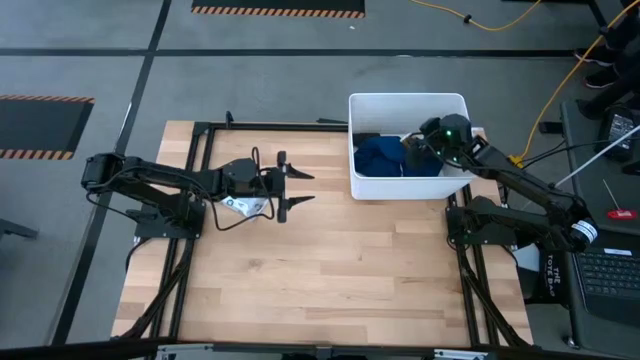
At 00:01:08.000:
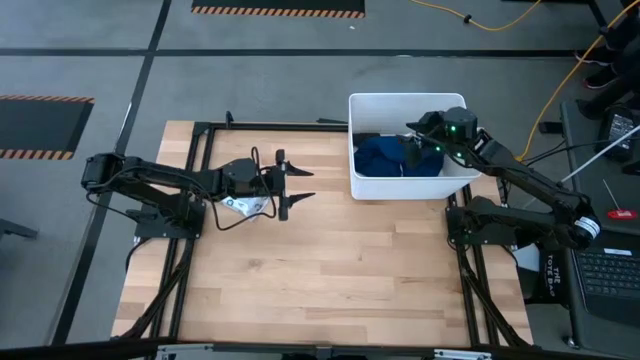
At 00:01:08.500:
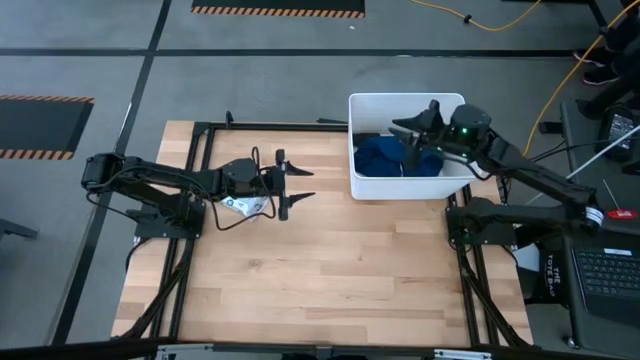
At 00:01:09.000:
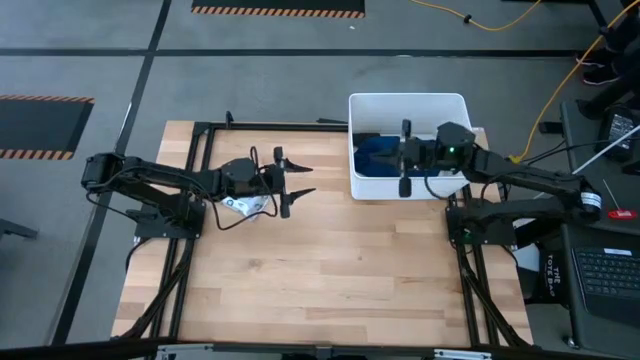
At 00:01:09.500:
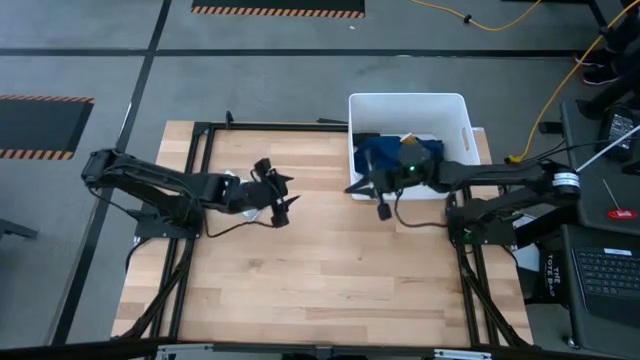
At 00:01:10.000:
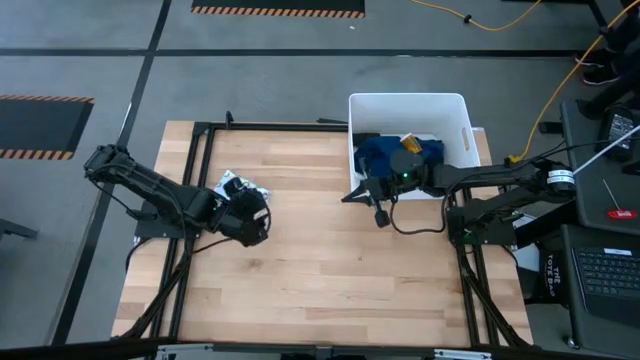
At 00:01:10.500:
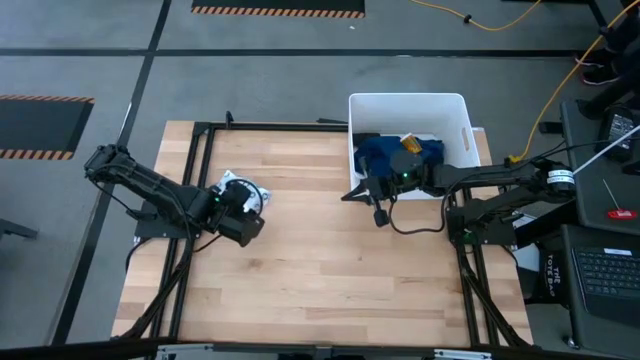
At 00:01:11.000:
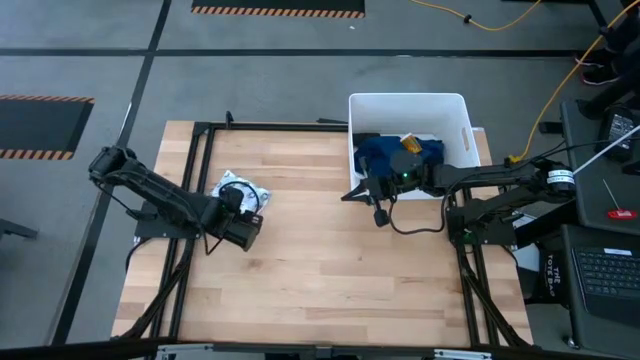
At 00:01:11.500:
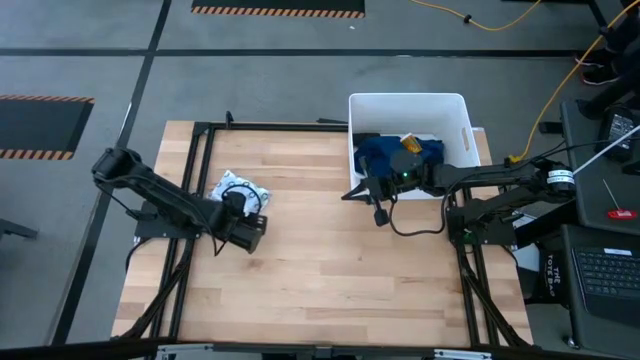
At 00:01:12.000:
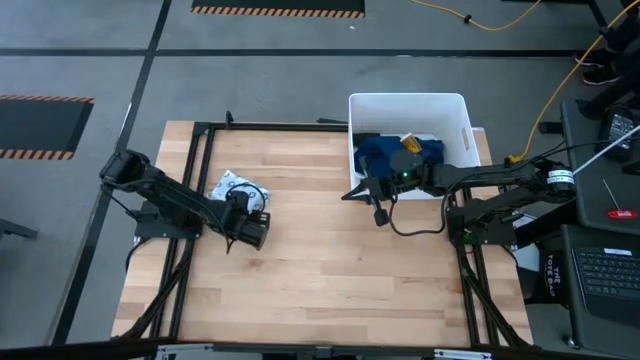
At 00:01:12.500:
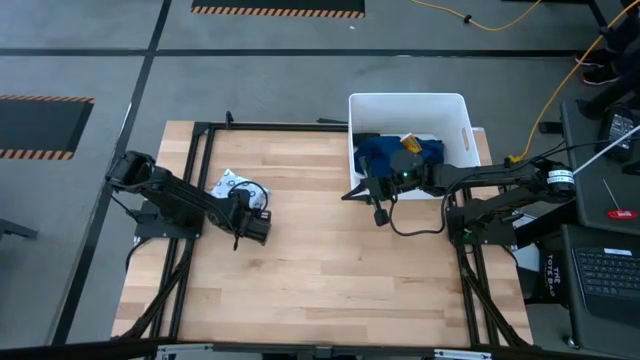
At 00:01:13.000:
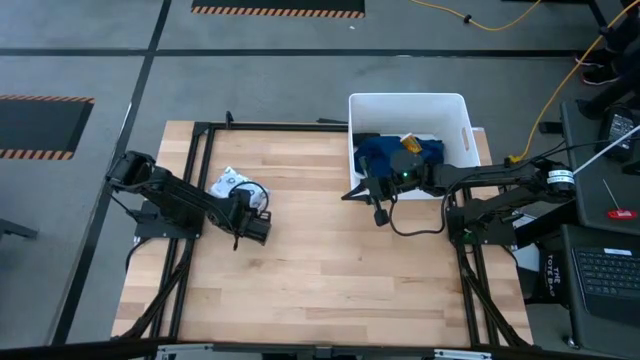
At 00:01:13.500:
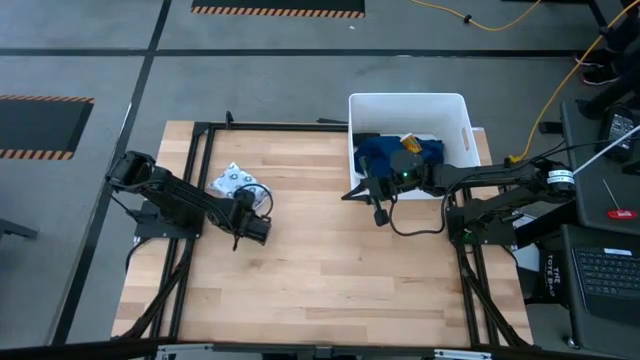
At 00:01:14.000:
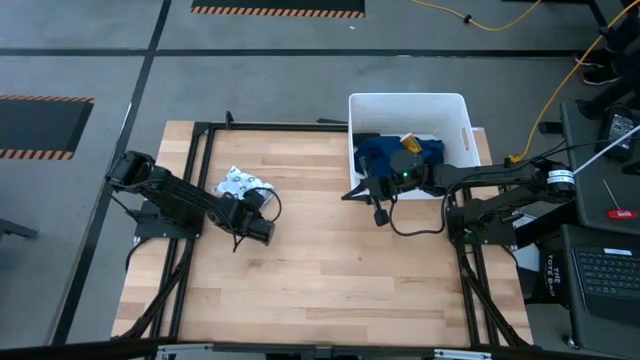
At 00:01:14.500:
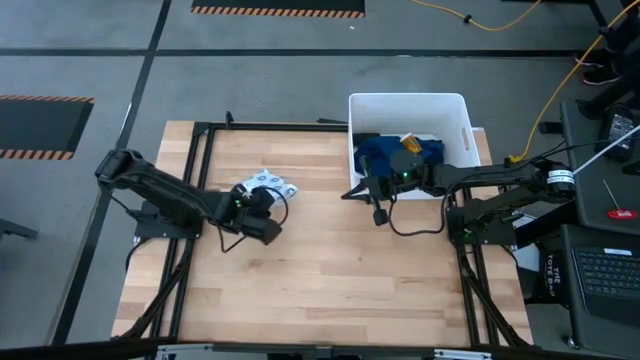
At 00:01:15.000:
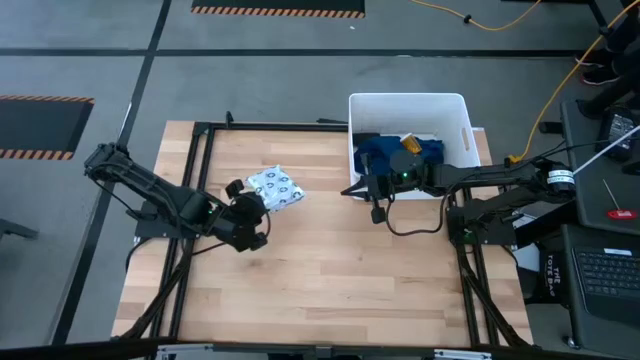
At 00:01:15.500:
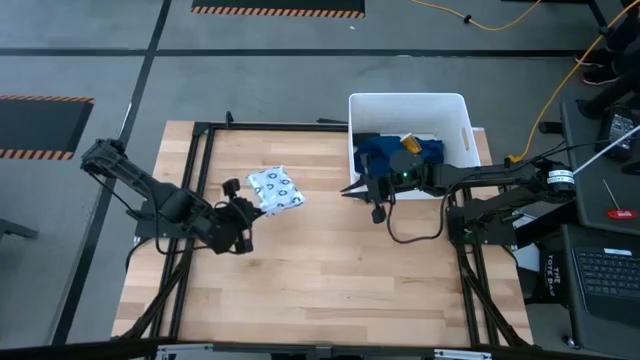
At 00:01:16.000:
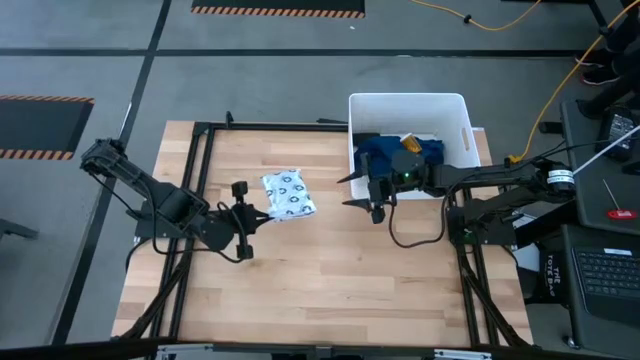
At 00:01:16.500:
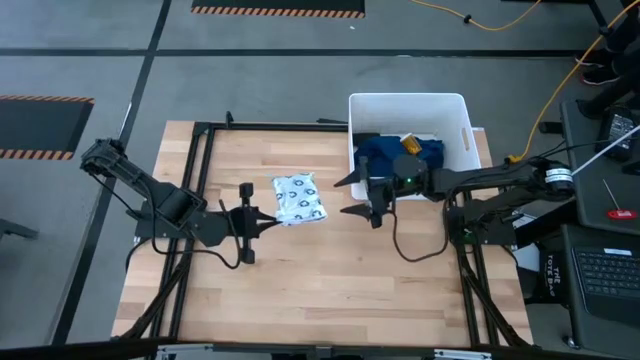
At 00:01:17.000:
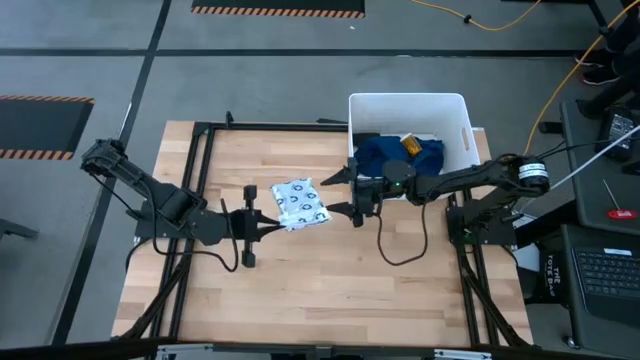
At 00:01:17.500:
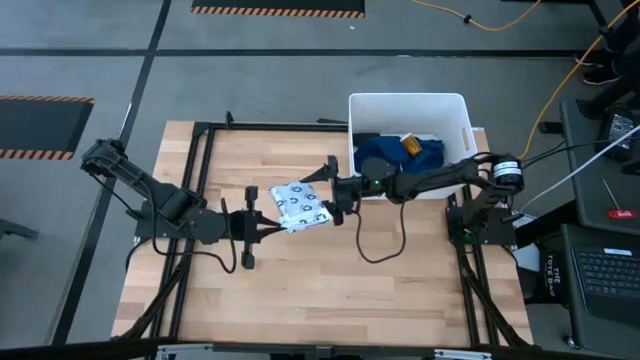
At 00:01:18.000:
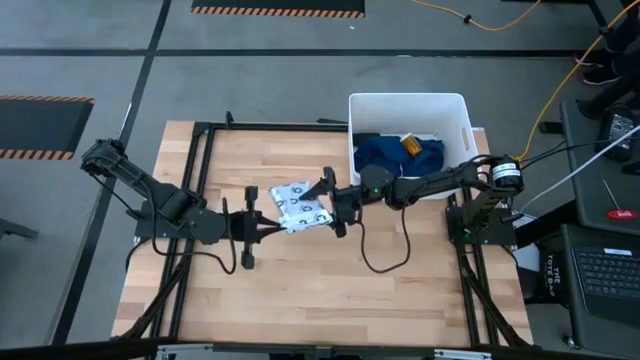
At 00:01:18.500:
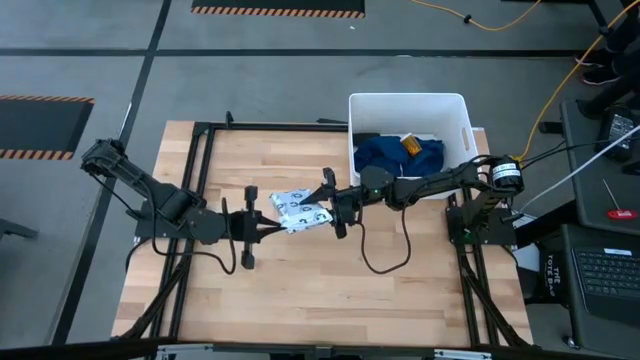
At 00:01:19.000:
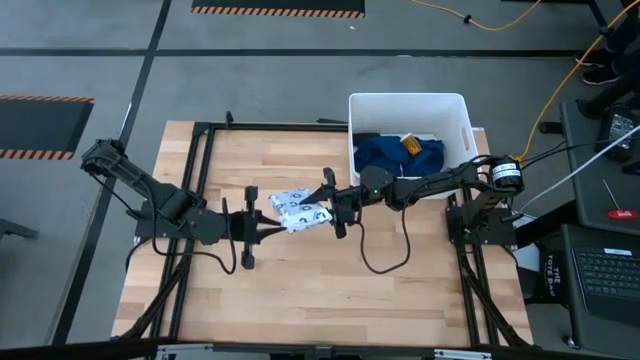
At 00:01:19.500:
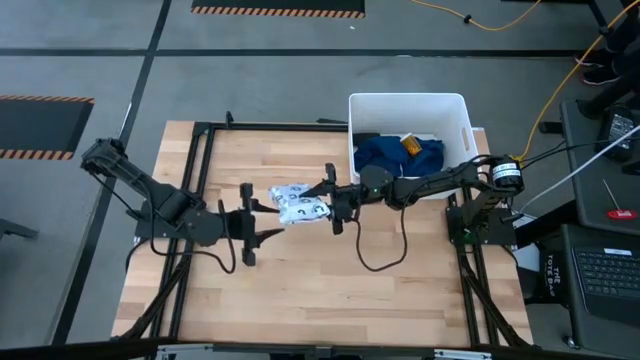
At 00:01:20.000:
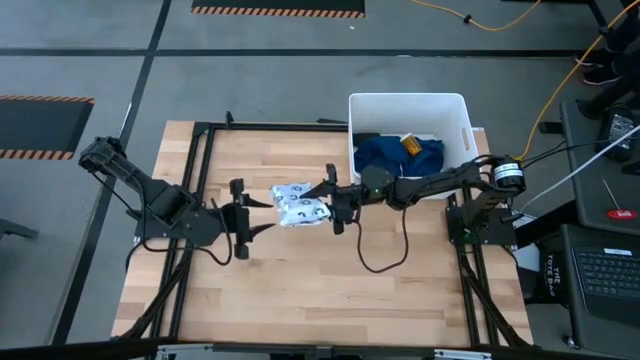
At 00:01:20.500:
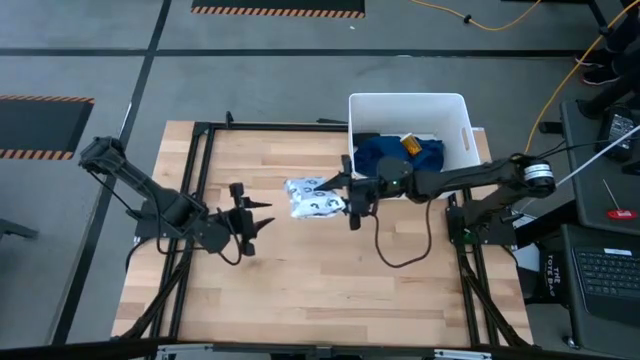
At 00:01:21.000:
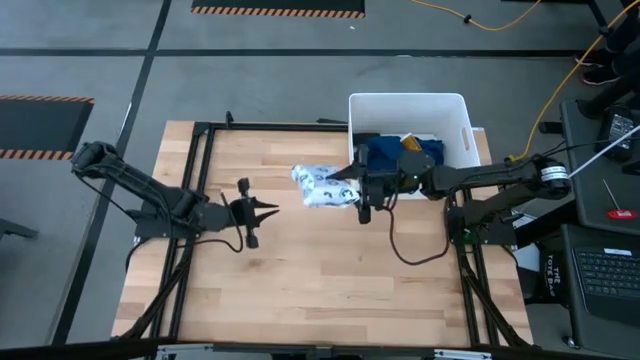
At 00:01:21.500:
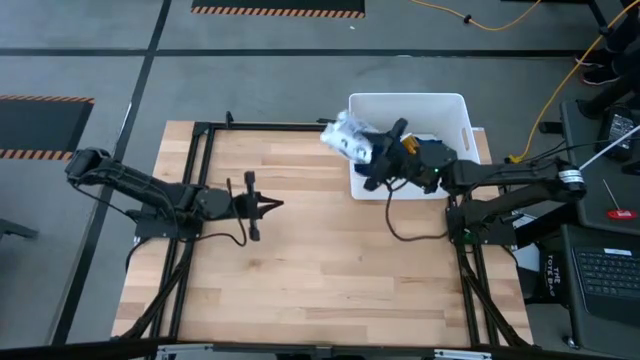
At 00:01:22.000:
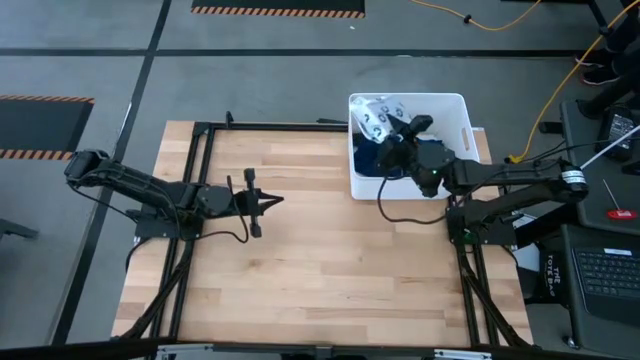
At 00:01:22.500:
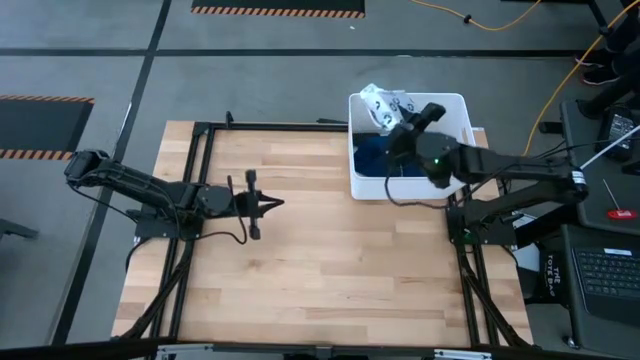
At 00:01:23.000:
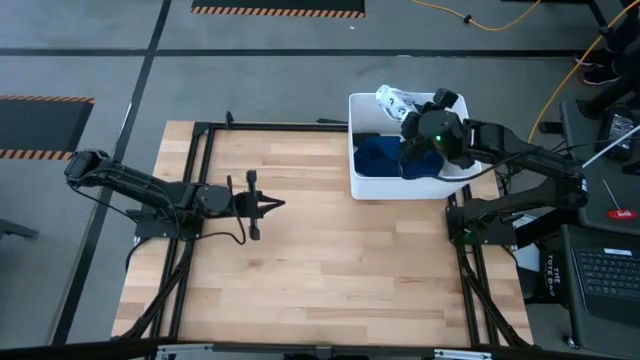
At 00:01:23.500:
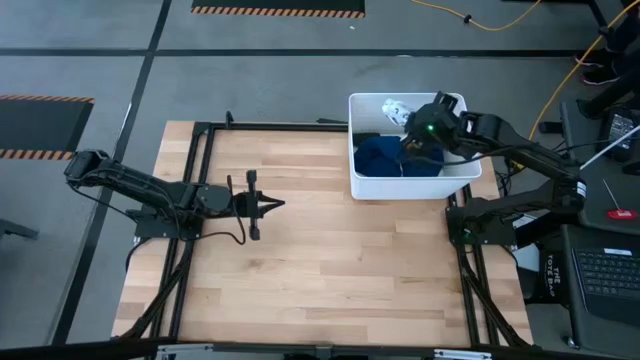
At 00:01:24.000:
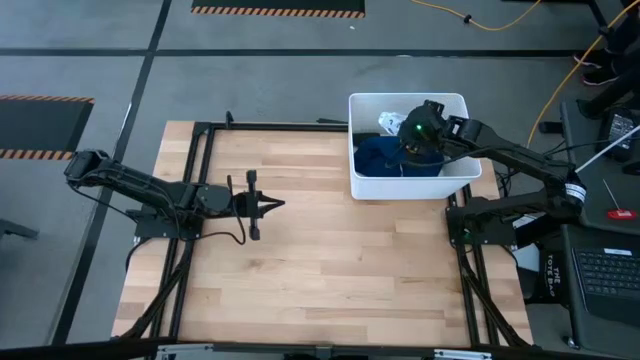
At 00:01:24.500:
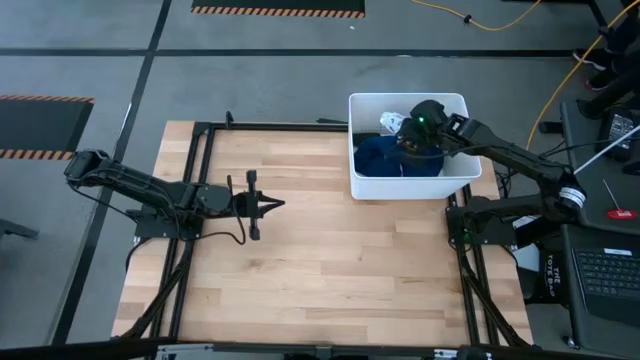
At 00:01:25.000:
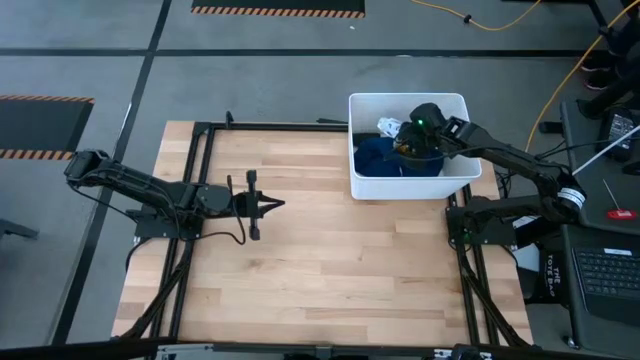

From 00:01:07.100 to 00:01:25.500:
Task: Pick & place medical supplies in basket/bin
Put the white mailer bag into the white container
